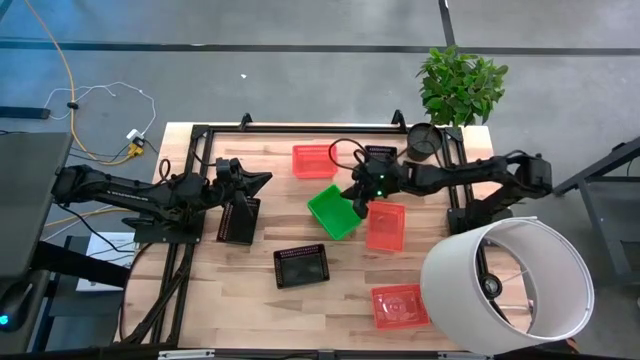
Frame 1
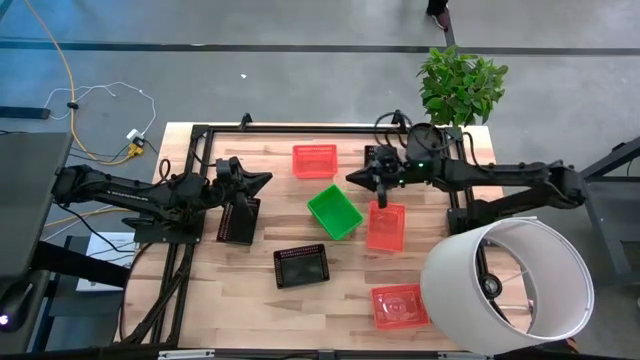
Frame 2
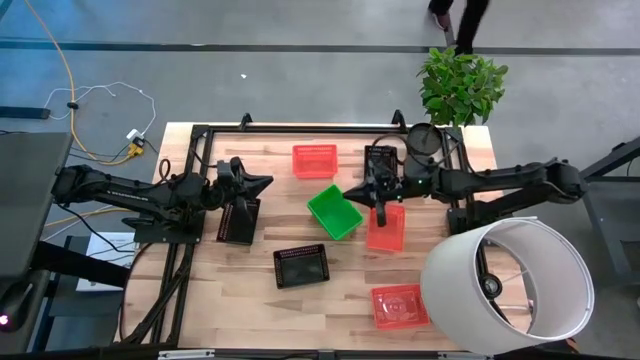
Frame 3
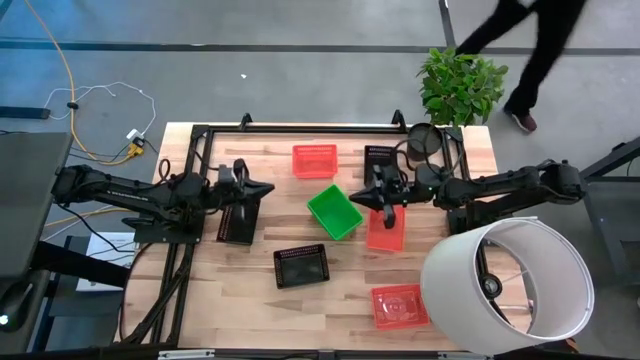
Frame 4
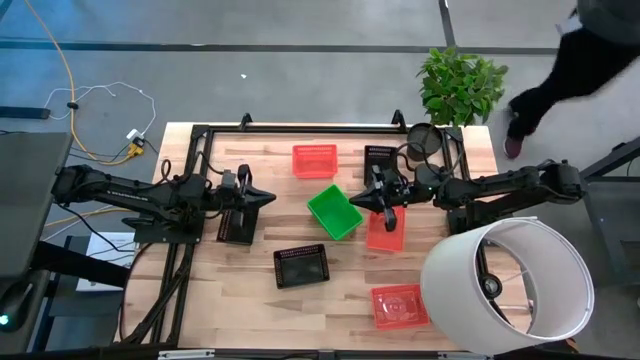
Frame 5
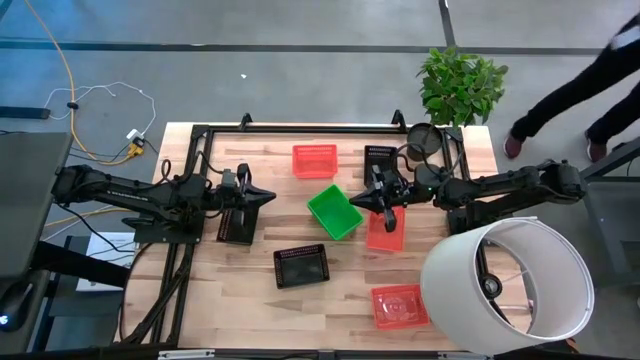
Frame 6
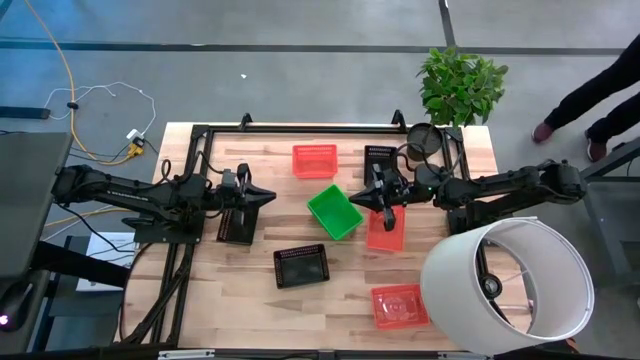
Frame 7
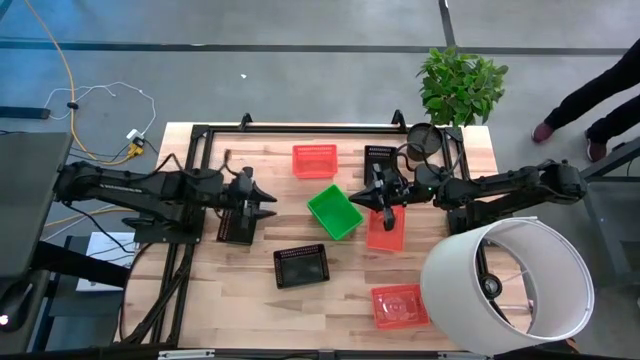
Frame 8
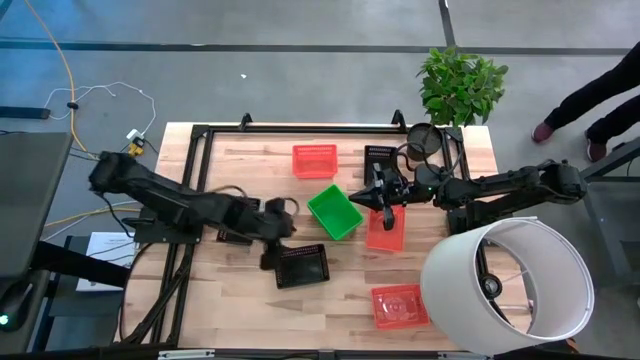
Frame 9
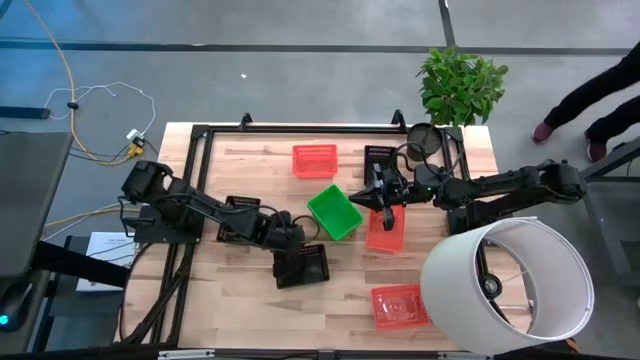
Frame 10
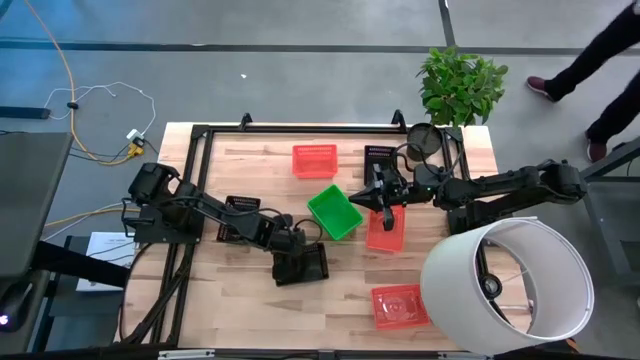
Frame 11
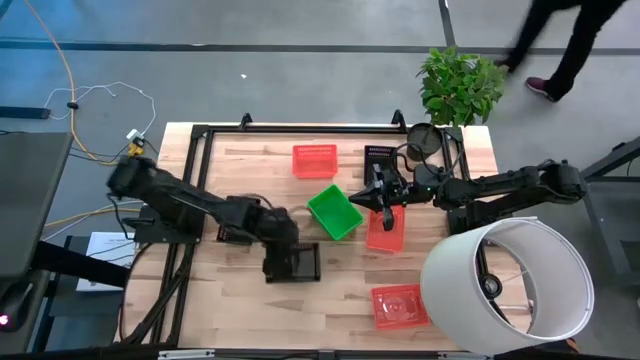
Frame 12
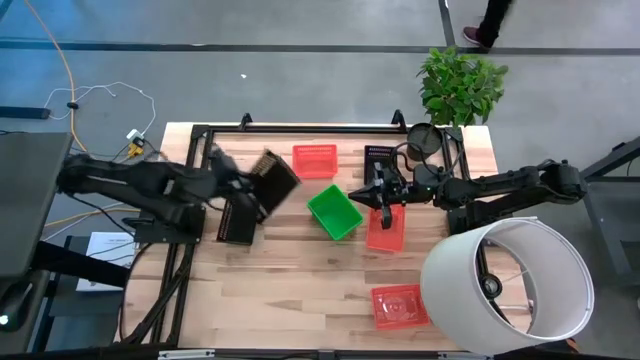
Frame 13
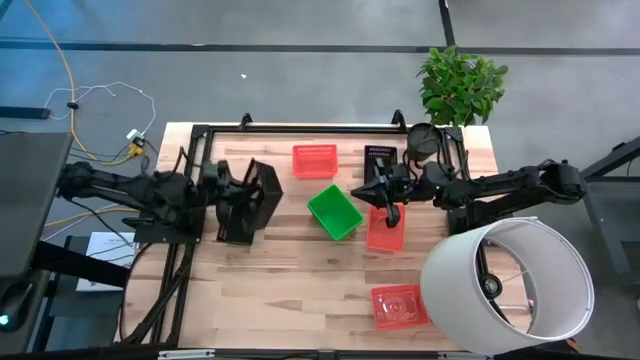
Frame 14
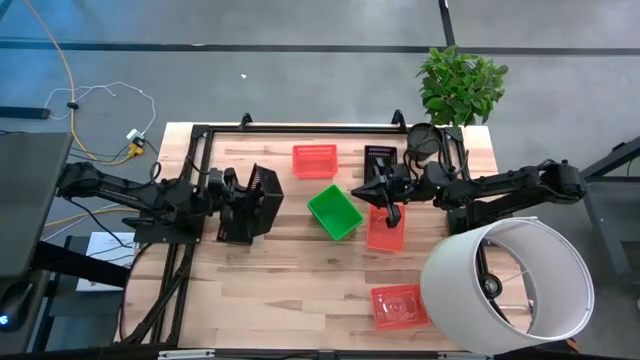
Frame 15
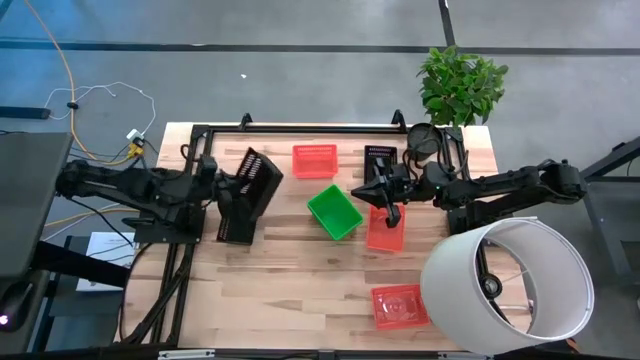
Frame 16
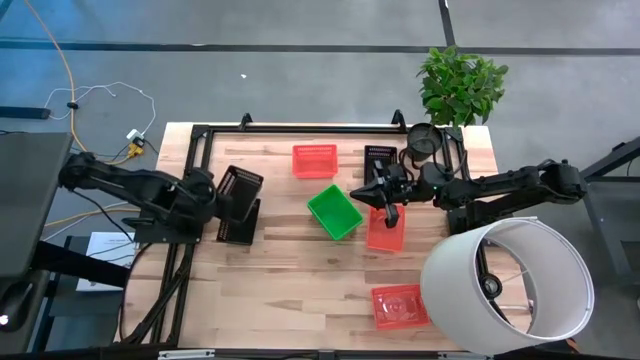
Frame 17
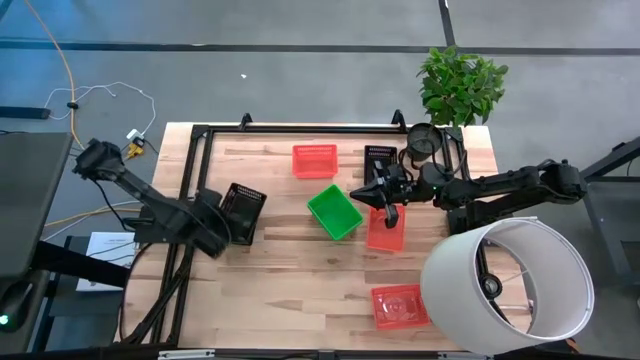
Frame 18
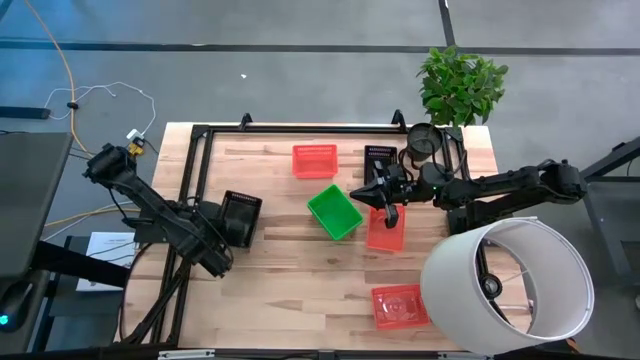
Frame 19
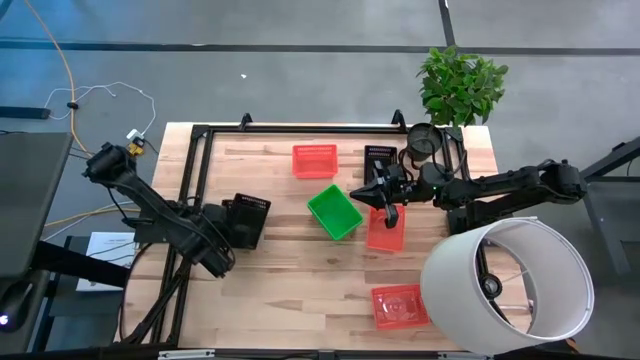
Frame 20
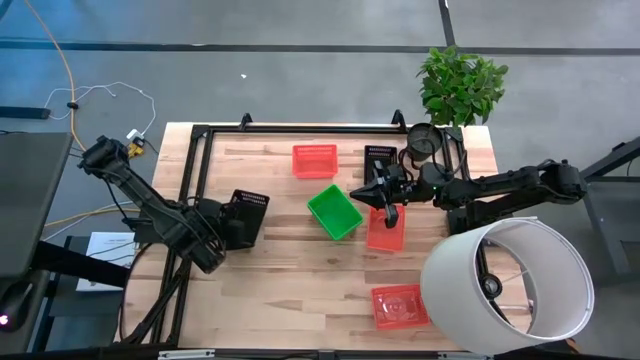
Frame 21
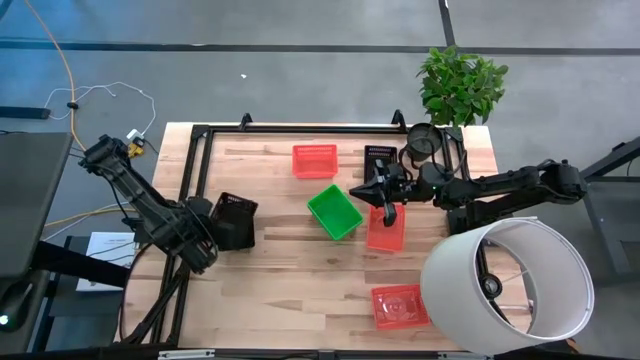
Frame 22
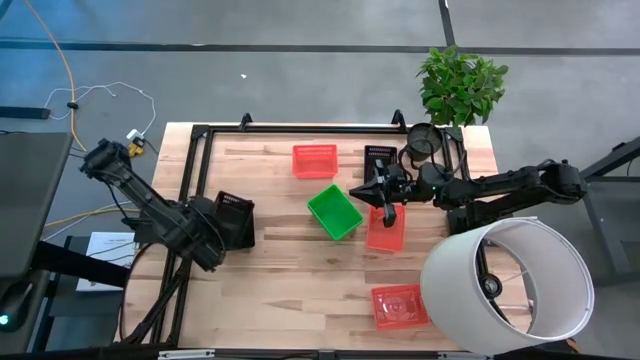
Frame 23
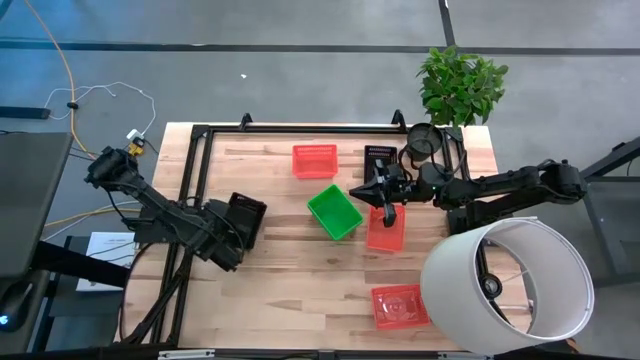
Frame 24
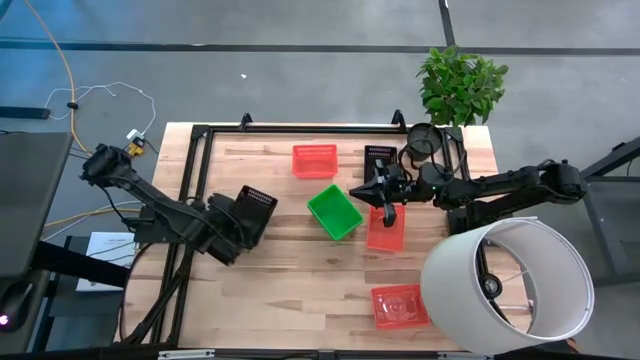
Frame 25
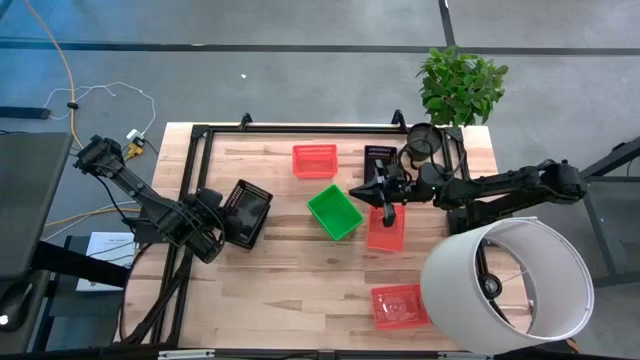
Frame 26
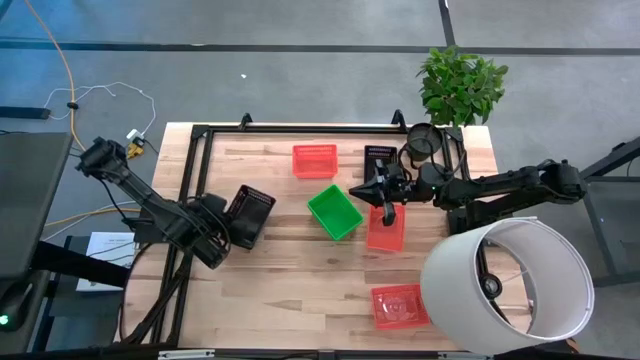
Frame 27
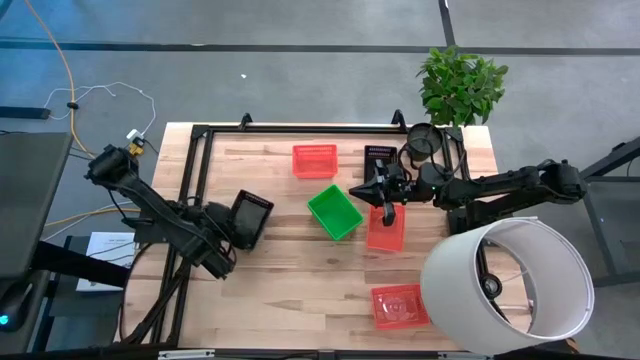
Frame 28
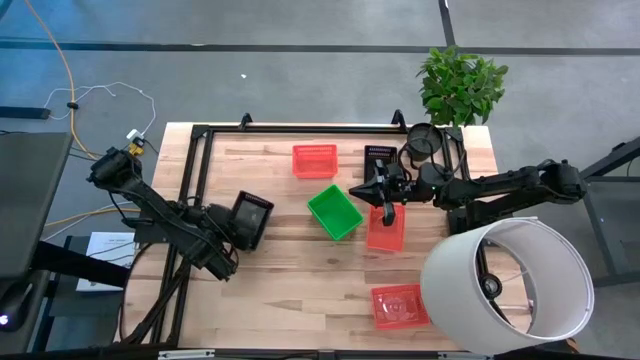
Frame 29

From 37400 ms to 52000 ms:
Stack the black basket on the black basket
